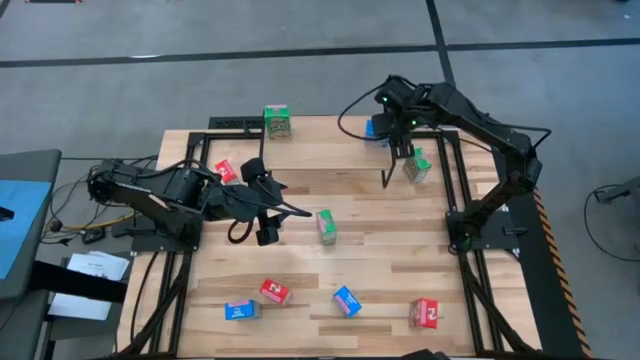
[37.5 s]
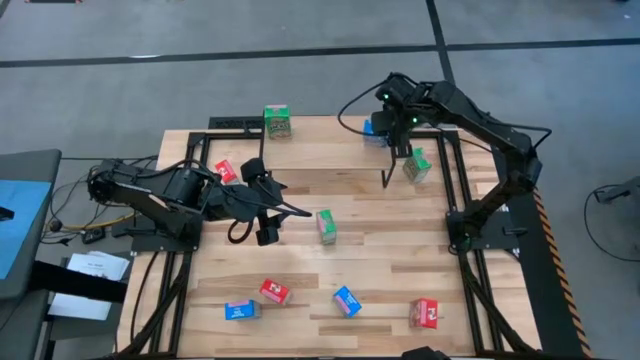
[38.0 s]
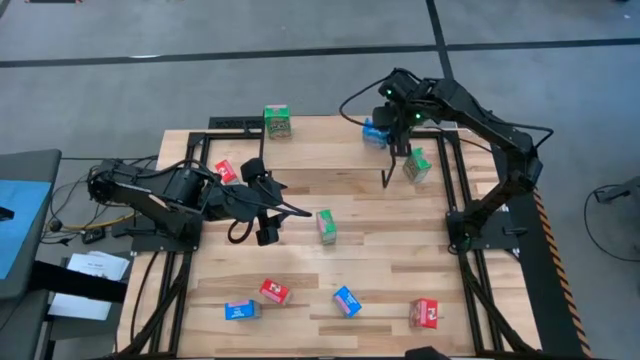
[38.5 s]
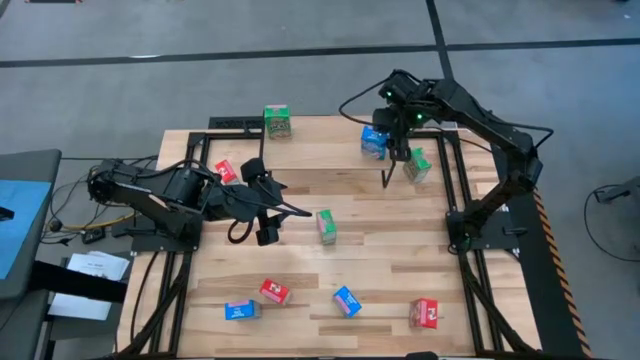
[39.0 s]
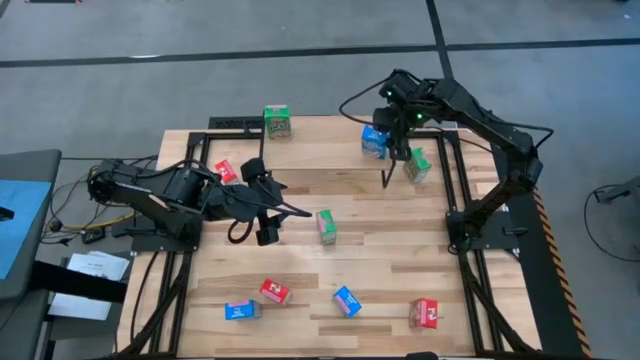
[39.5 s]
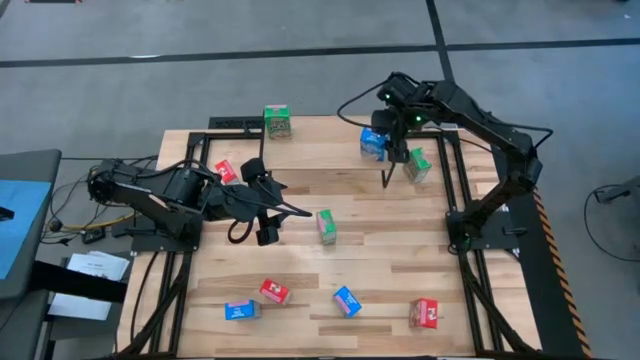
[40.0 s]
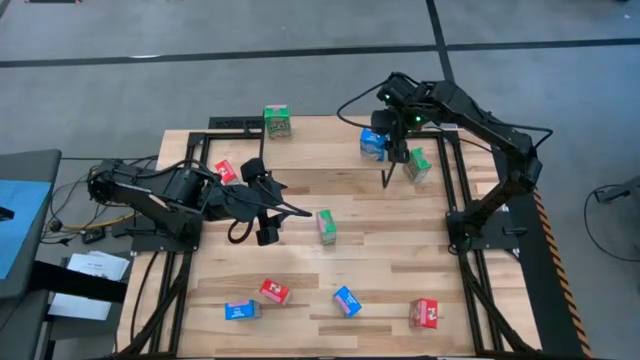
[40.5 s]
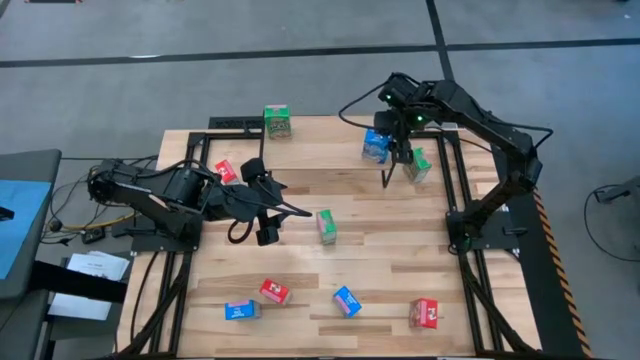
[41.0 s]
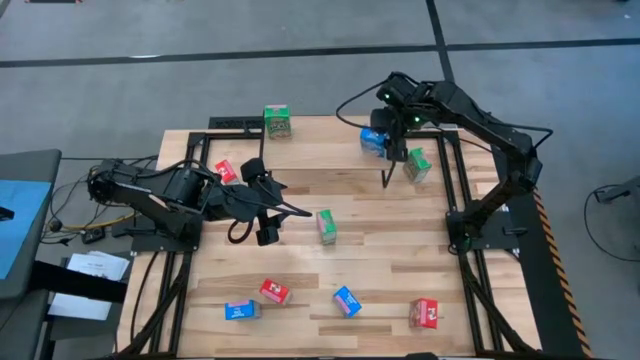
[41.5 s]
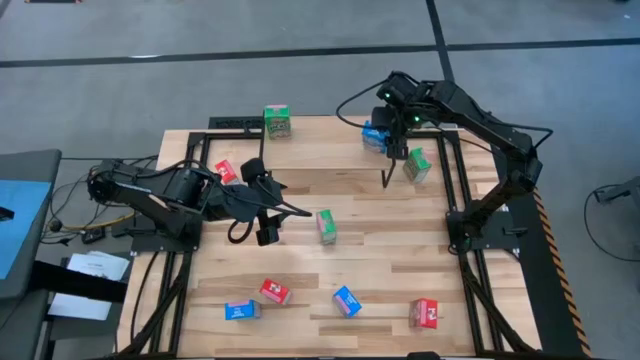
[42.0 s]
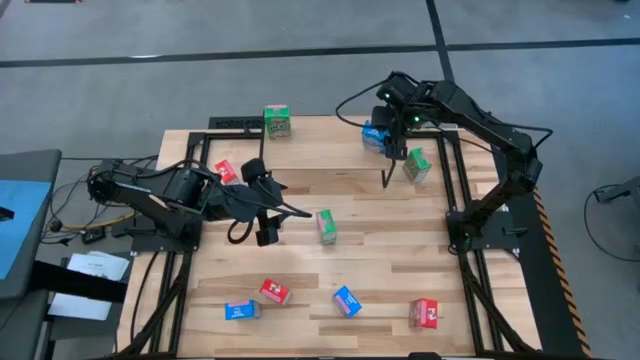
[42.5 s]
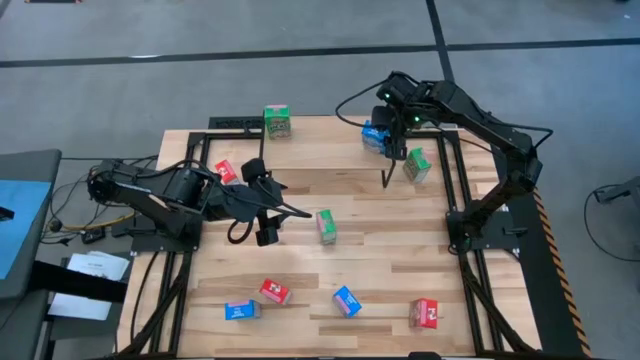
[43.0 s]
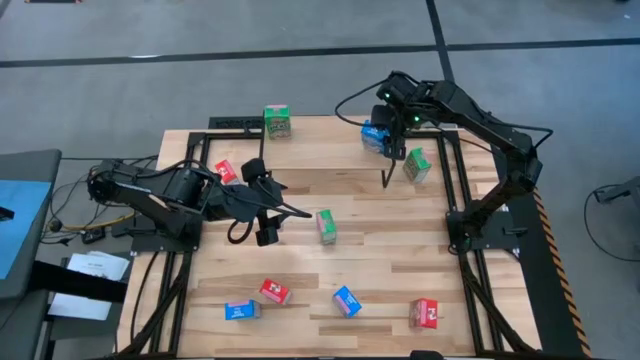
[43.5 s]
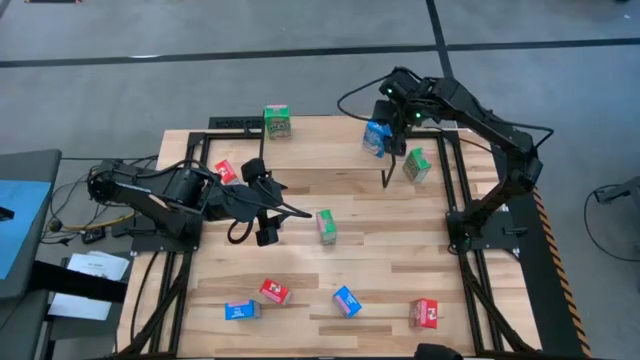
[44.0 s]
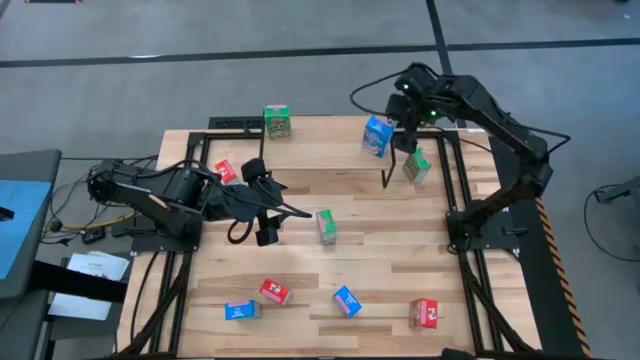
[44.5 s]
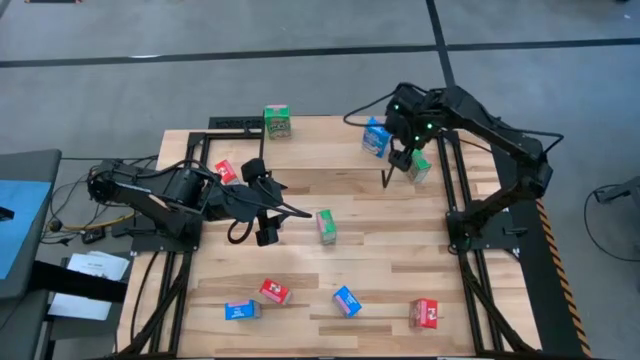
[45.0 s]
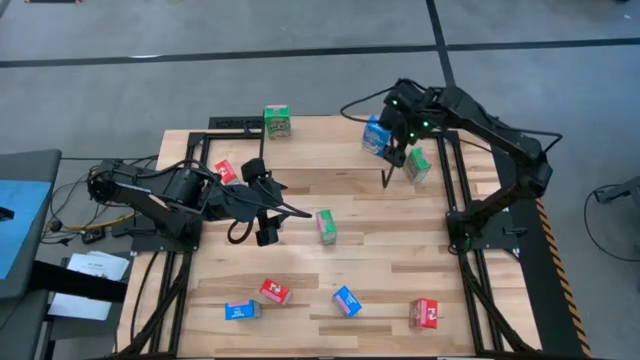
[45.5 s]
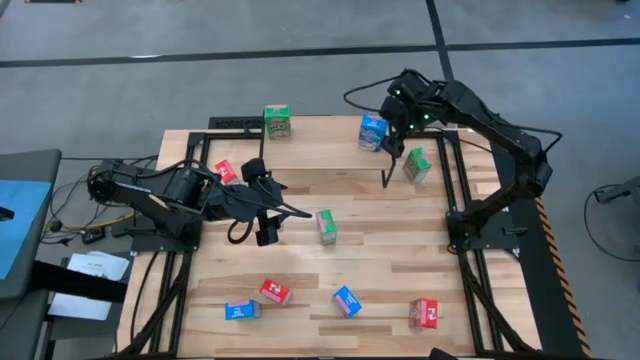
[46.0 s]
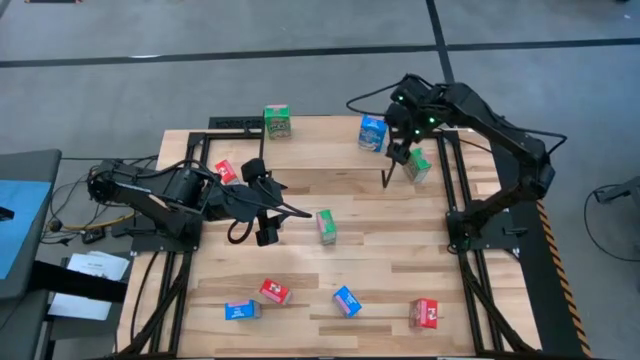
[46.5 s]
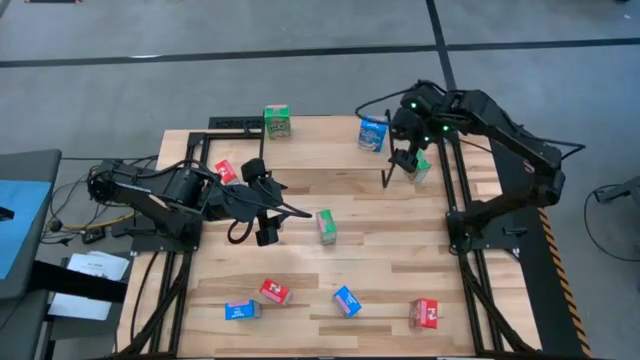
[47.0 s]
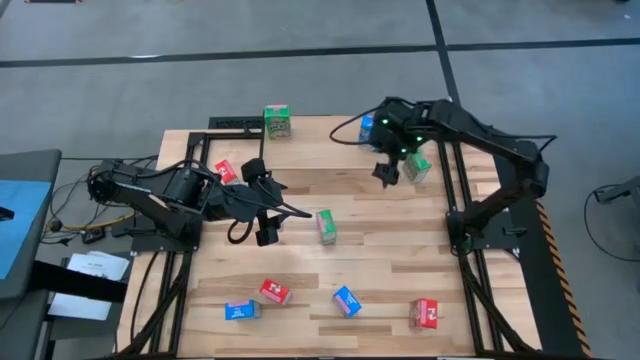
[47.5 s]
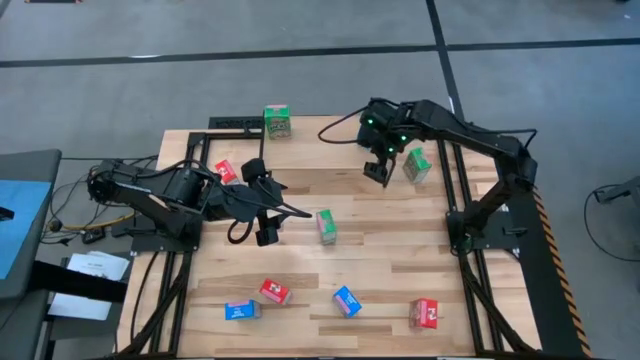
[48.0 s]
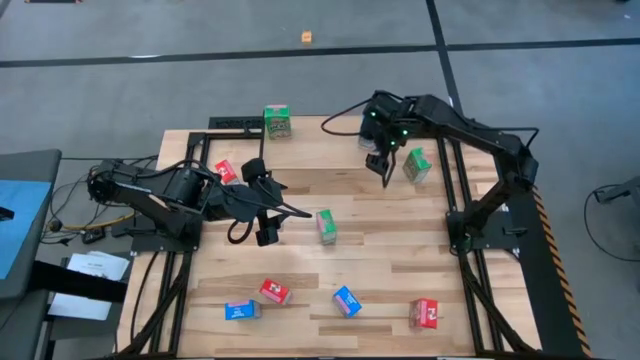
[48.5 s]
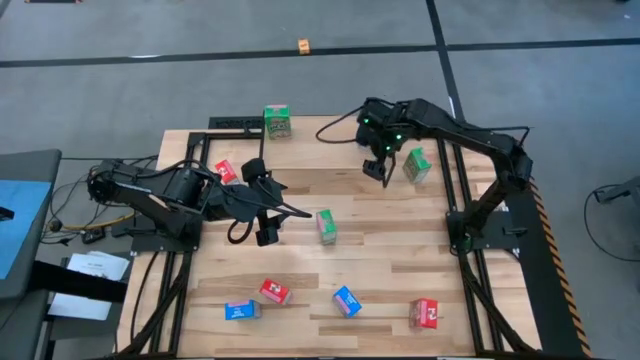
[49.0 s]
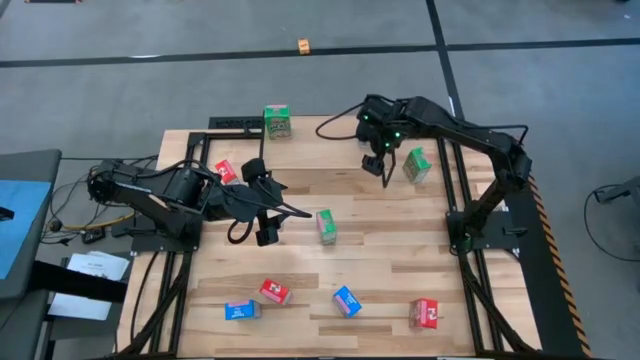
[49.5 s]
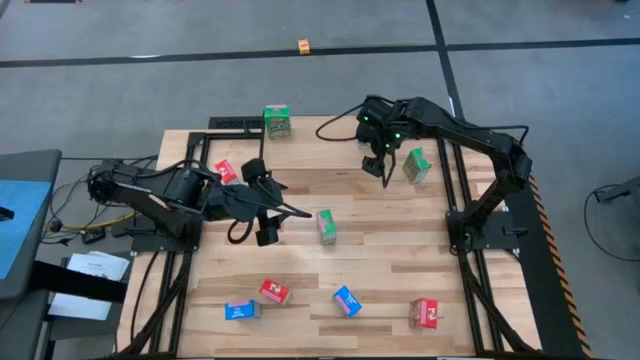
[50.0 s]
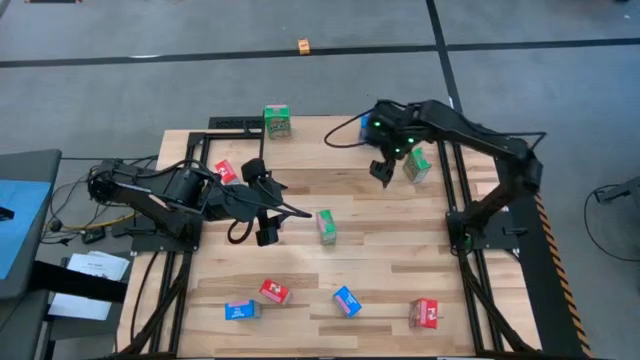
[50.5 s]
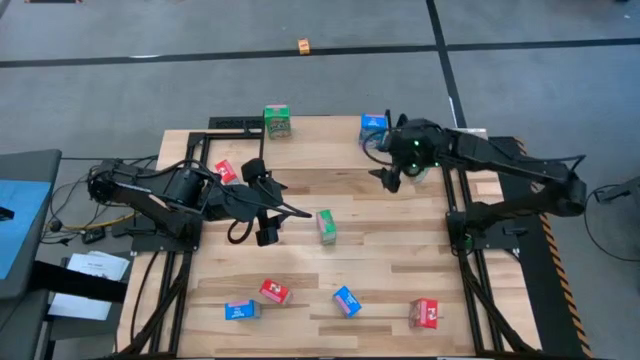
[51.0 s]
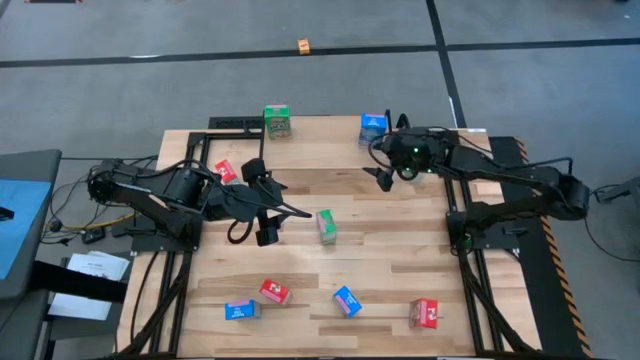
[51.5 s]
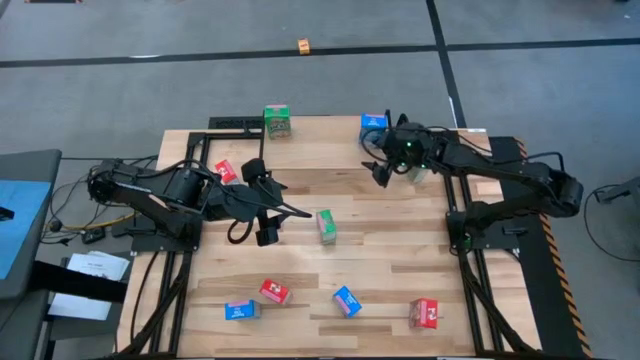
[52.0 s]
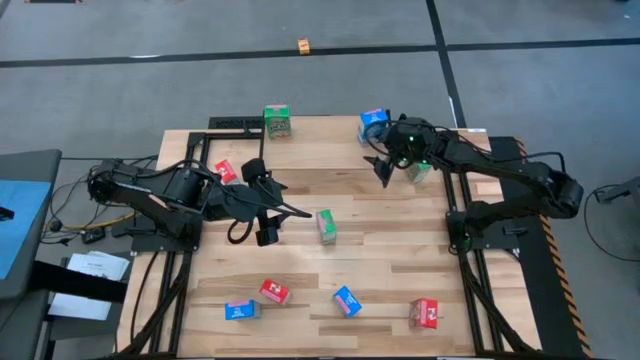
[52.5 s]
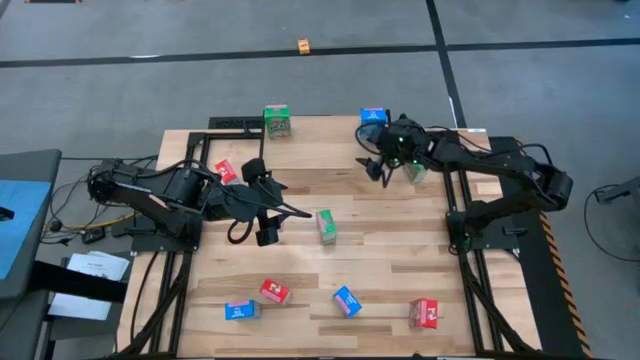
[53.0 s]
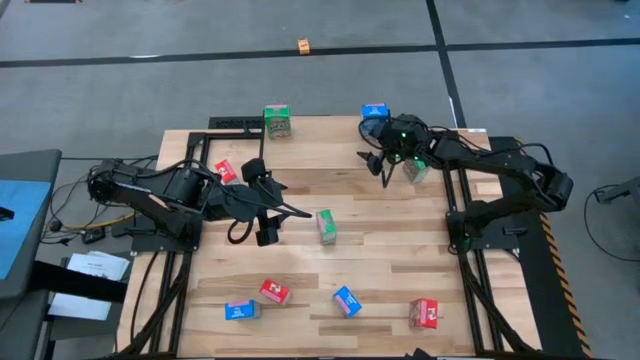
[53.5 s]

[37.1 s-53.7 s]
Task: Stack cereal on shelf
Put the top right blue cereal box on the shelf

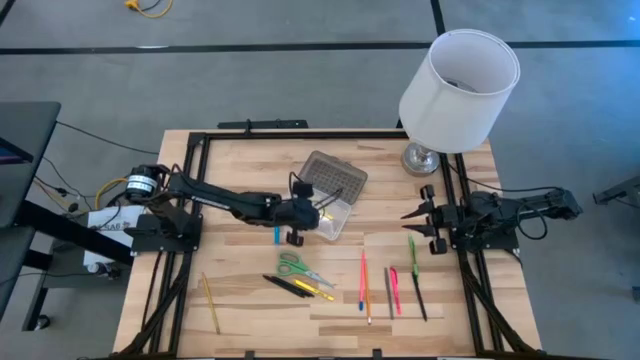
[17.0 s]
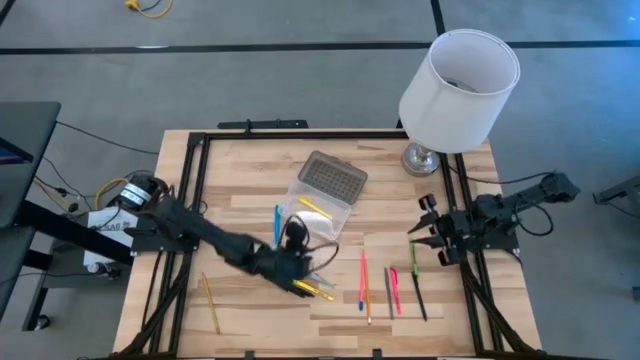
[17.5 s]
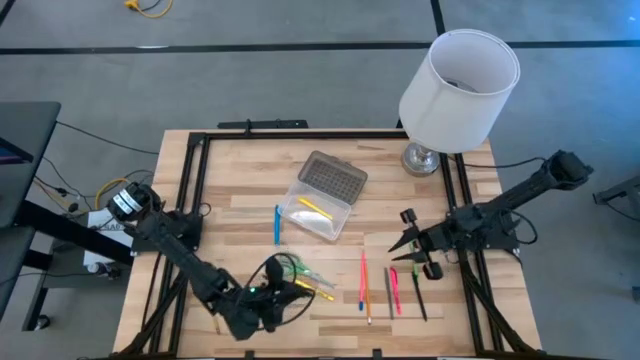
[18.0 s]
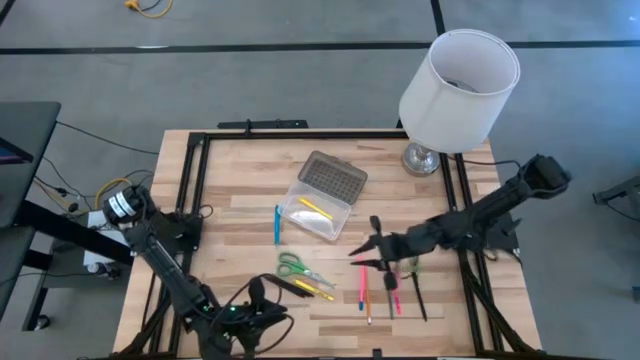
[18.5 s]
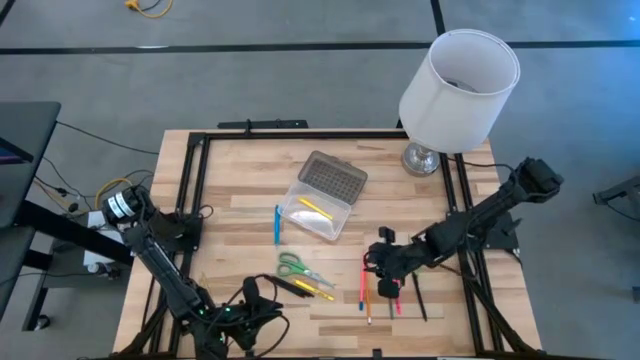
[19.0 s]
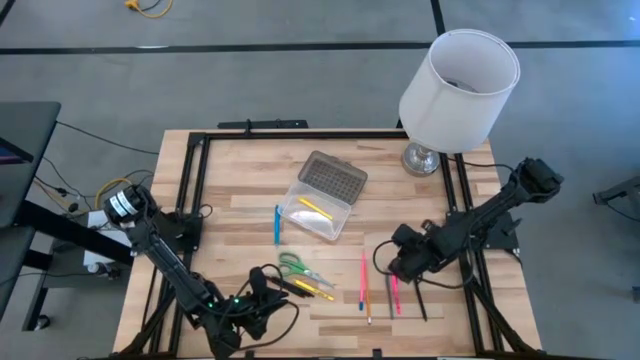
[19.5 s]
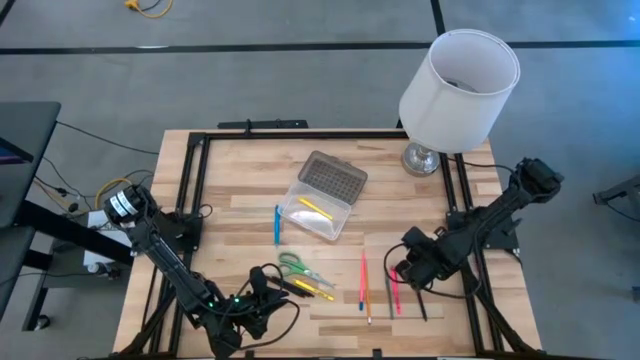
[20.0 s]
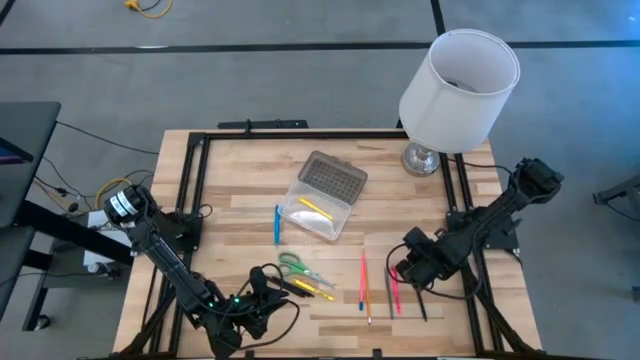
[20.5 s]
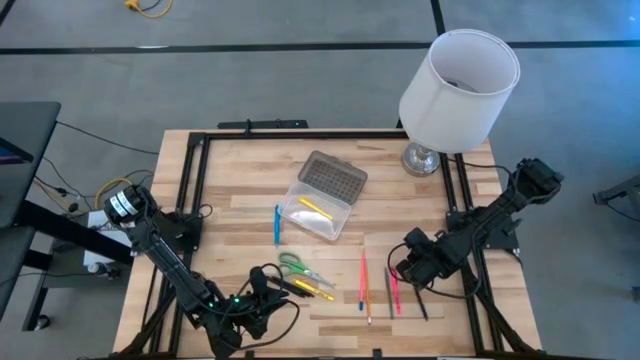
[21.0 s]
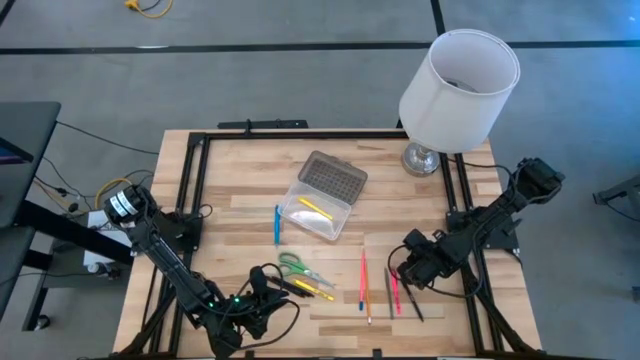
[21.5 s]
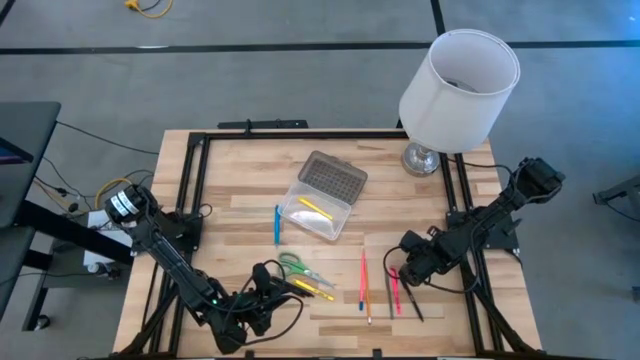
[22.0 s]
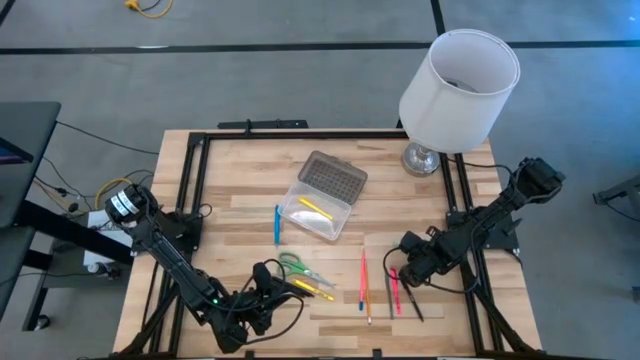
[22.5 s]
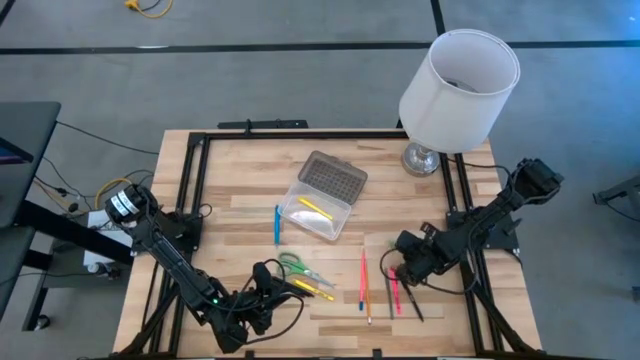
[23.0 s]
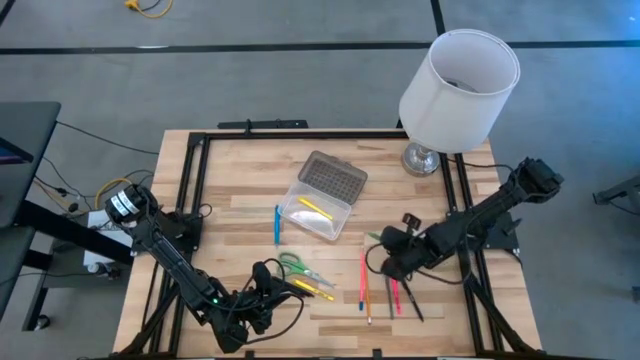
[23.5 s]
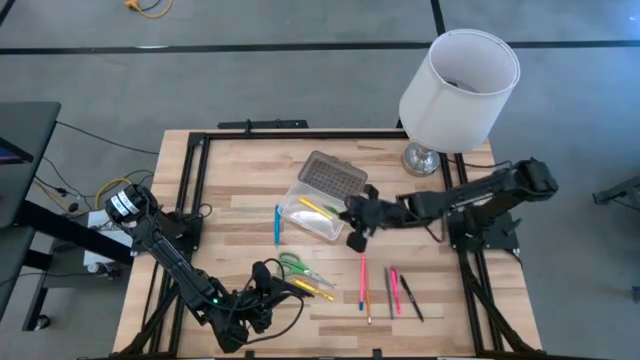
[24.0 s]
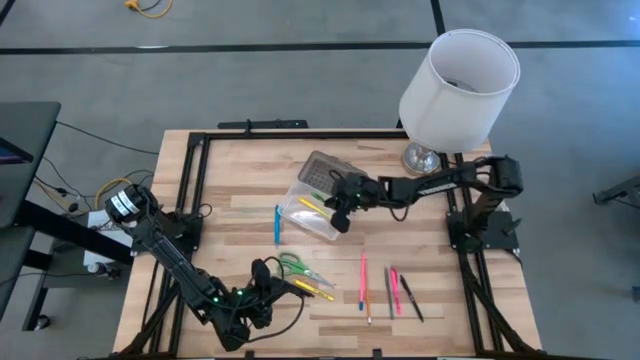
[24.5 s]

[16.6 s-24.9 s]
Task: Pick & place school supplies into a supply box
Put the green pen into the gray supply box
